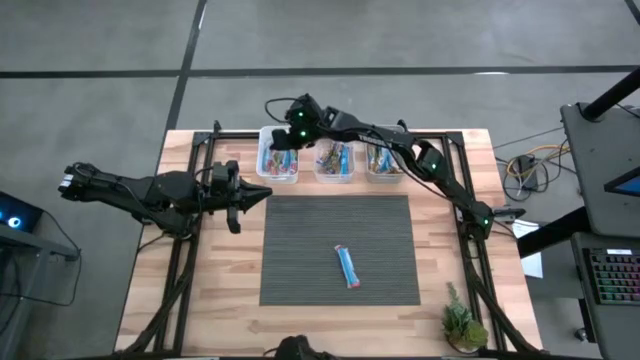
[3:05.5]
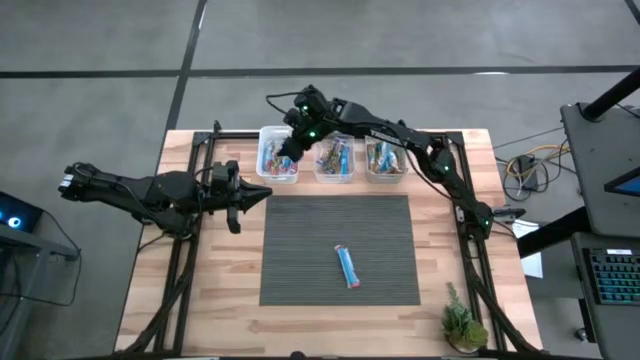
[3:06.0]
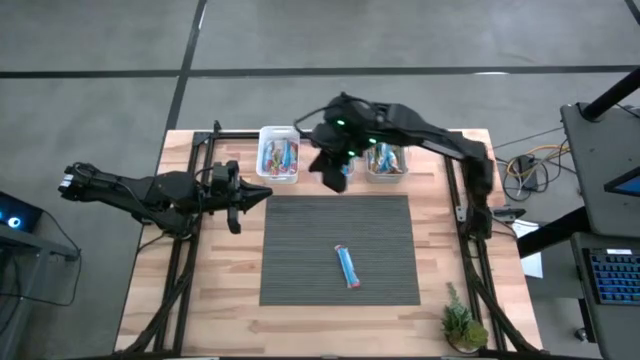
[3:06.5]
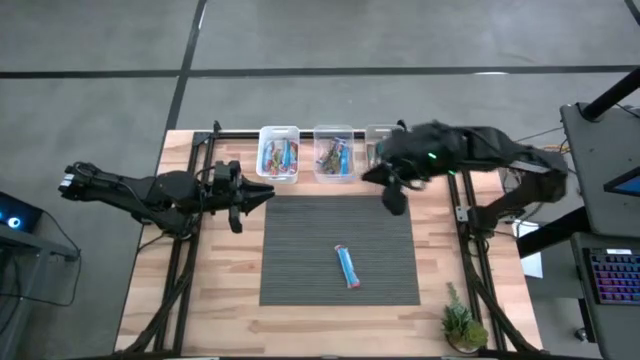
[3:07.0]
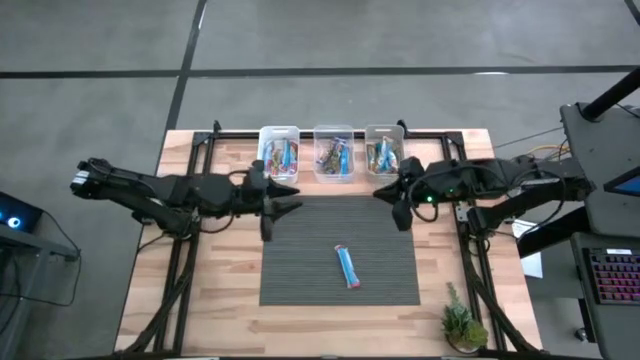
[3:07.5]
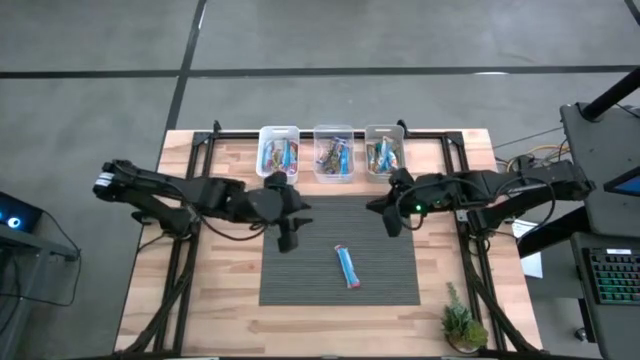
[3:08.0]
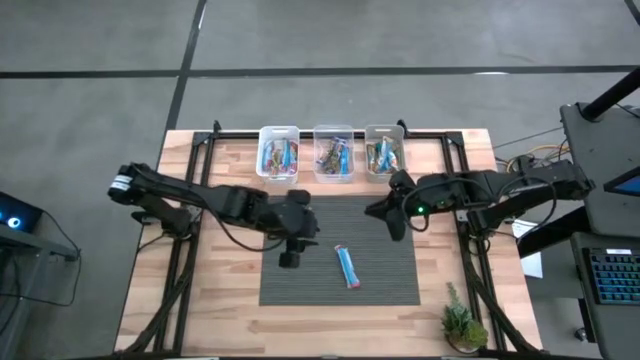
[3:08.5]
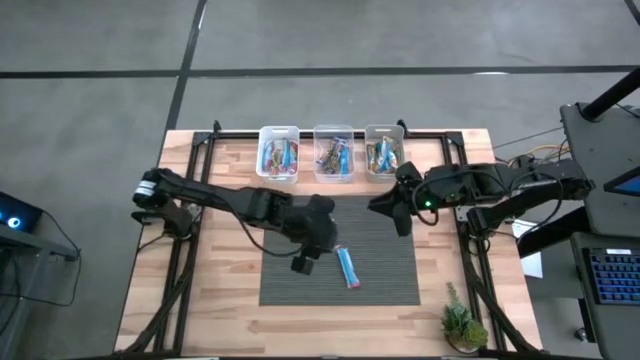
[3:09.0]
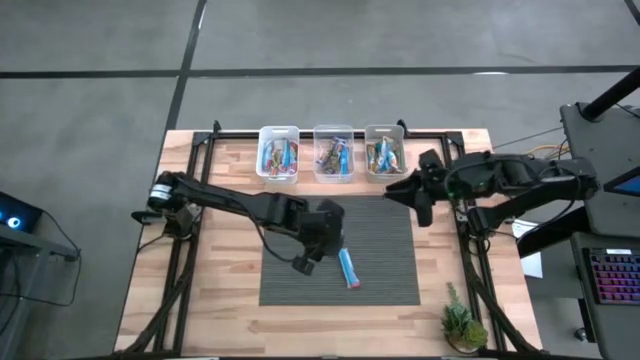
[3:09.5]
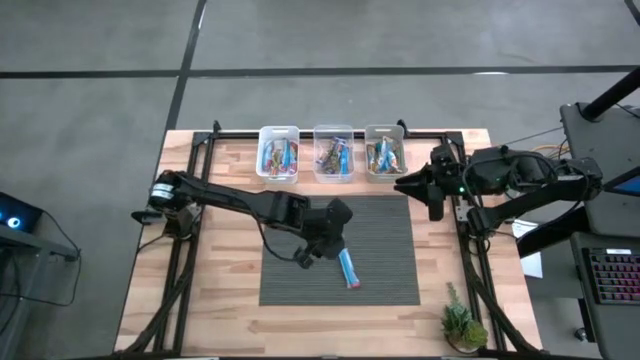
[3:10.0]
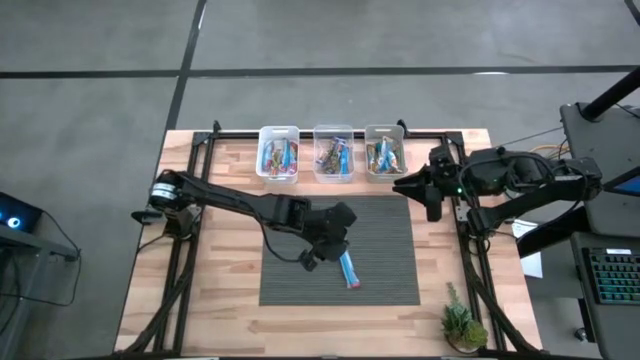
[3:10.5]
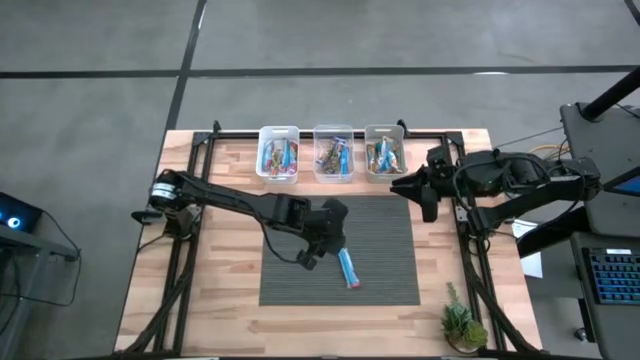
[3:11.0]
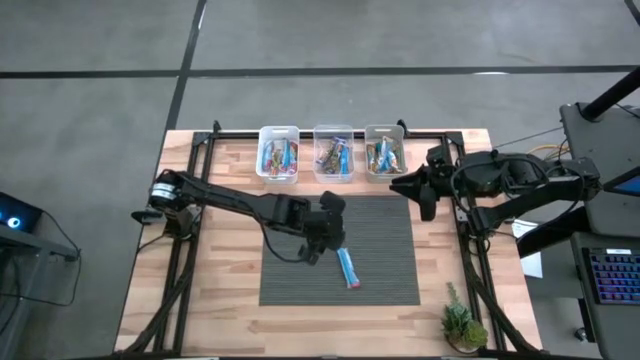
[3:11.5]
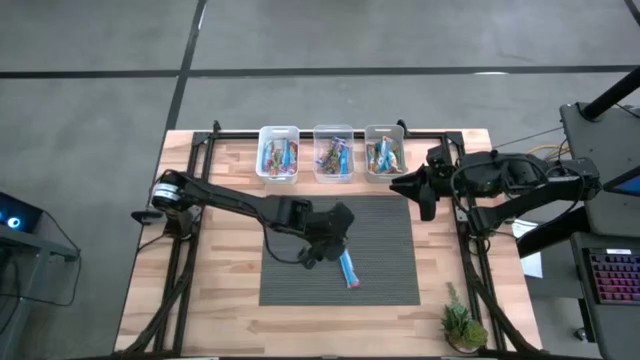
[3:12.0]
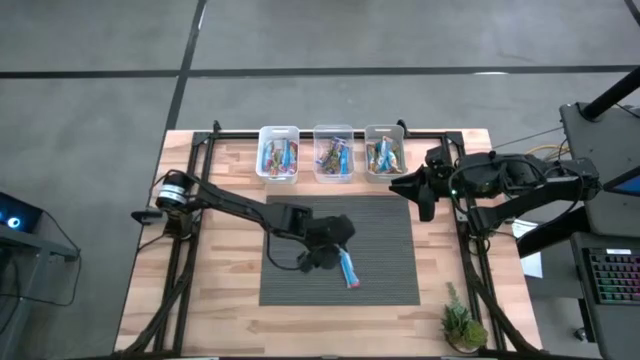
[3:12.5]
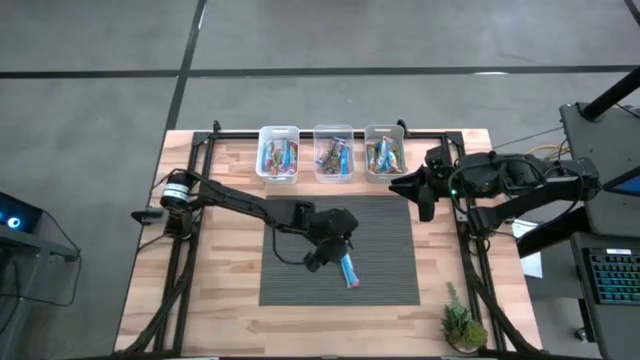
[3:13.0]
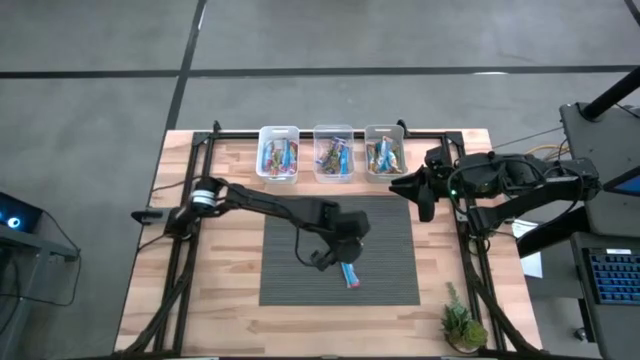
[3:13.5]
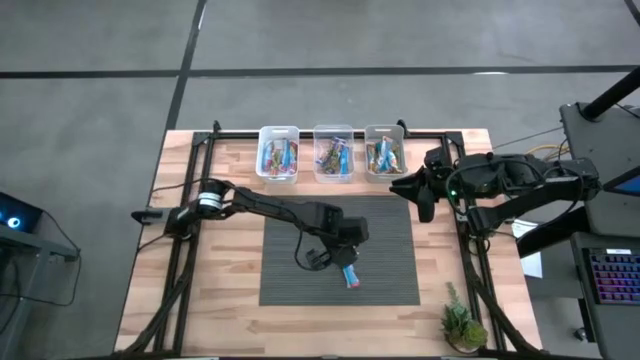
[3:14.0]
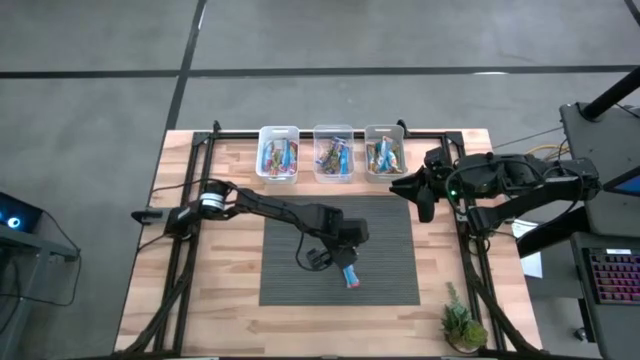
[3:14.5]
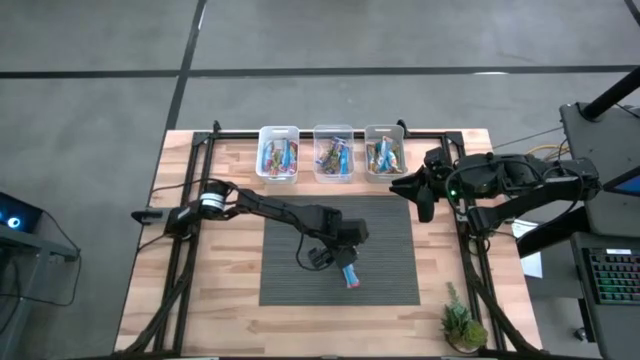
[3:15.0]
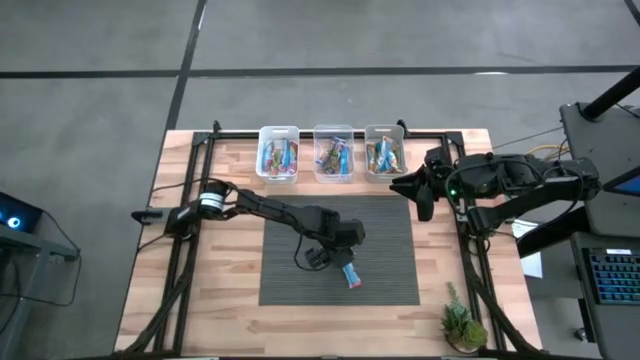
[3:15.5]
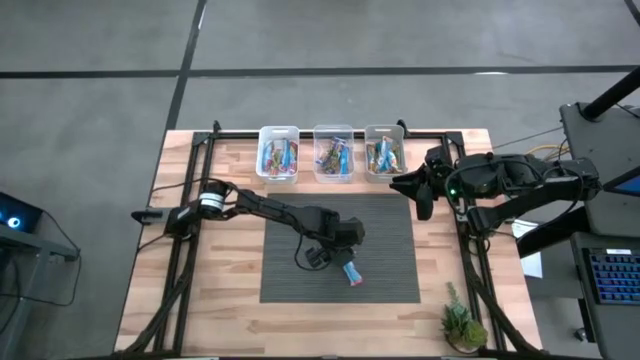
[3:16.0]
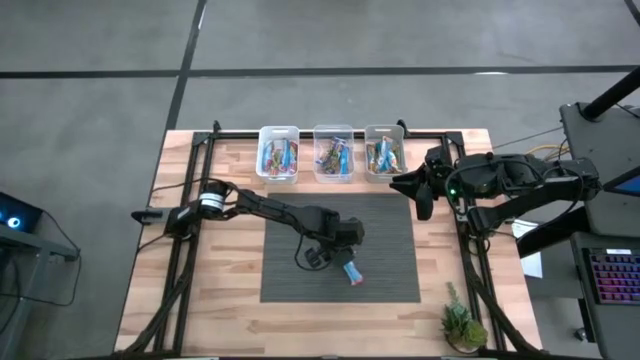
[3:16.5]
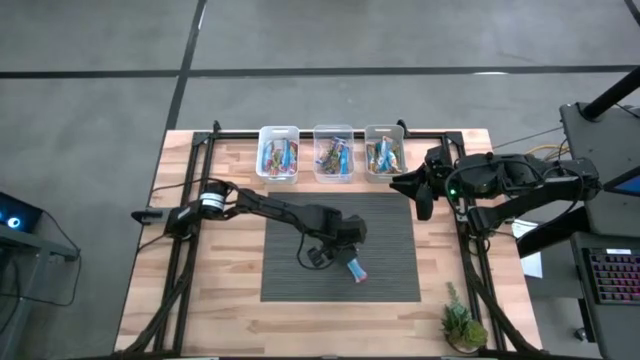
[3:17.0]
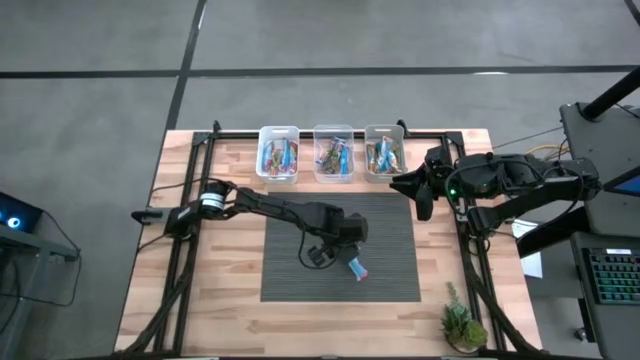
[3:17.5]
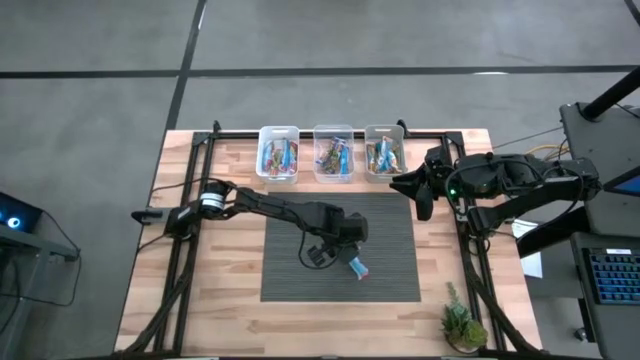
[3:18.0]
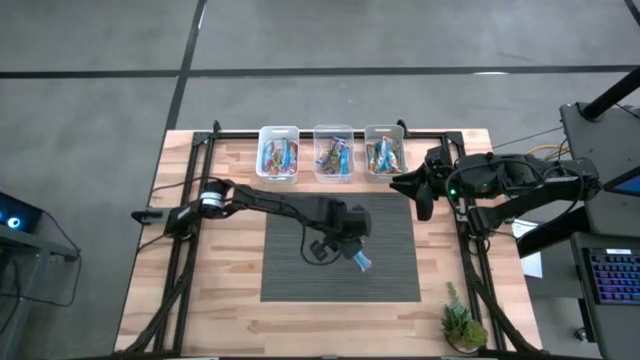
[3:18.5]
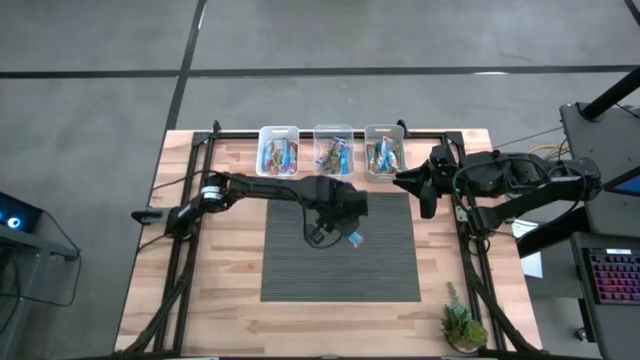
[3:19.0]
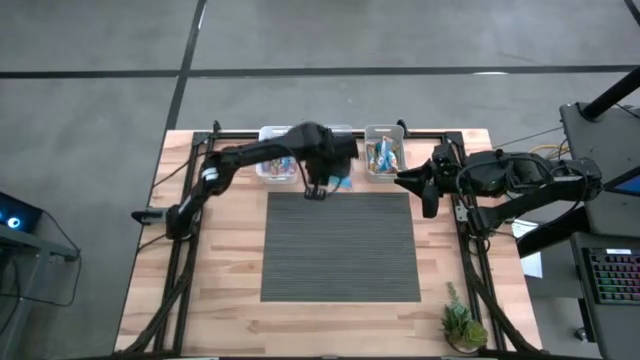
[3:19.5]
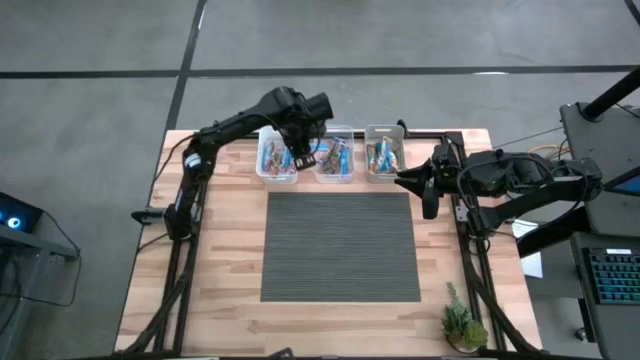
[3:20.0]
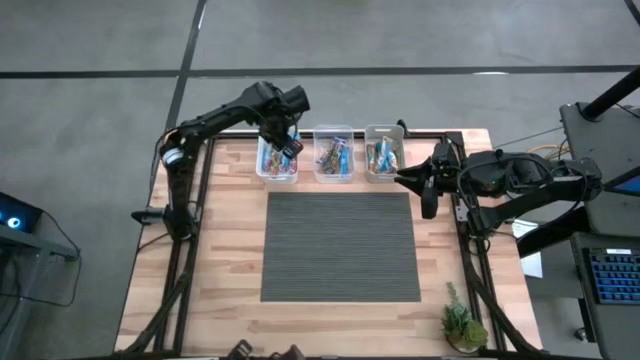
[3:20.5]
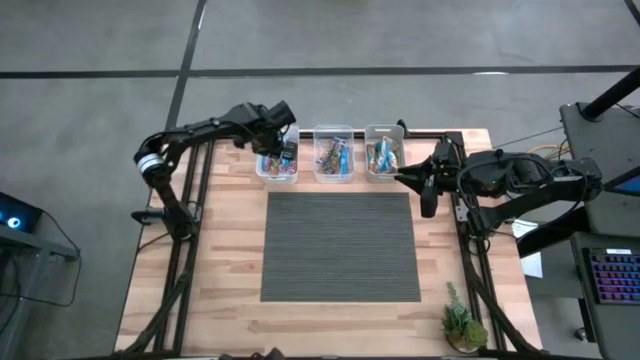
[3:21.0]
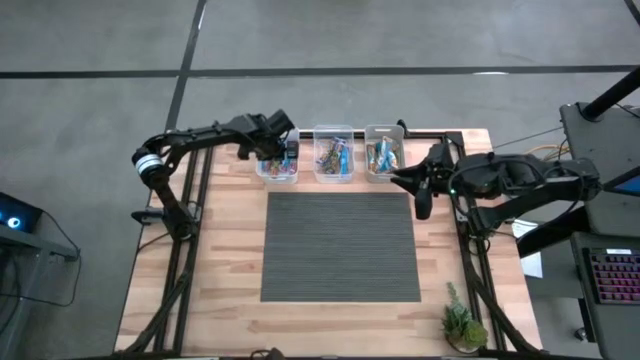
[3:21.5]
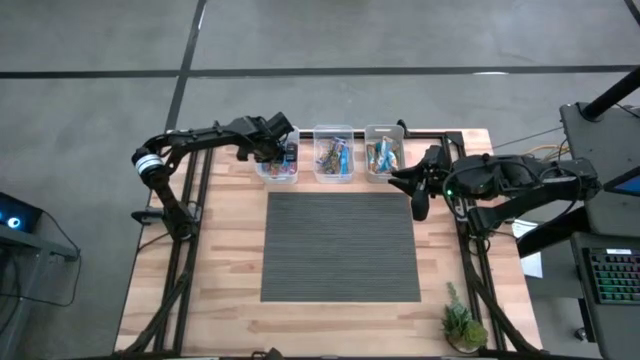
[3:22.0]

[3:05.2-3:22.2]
Task: Pick and place Granola Bars by type
Put the red granola bar into the white bin

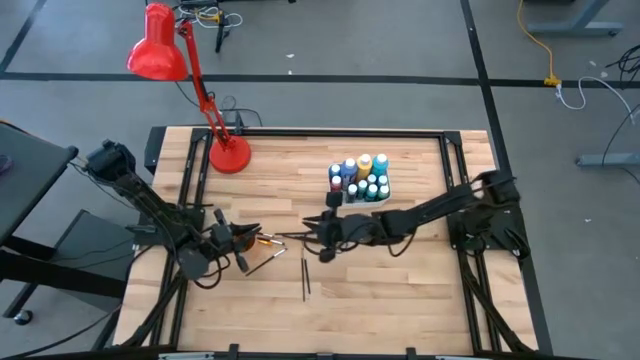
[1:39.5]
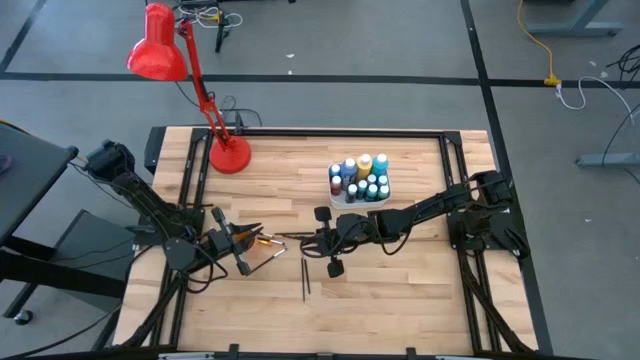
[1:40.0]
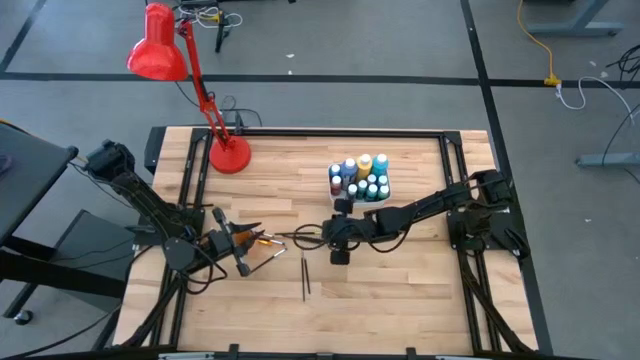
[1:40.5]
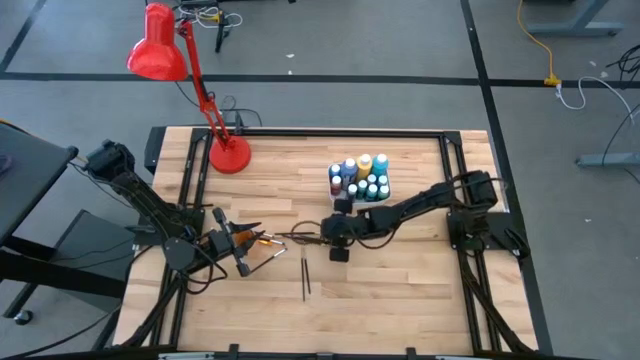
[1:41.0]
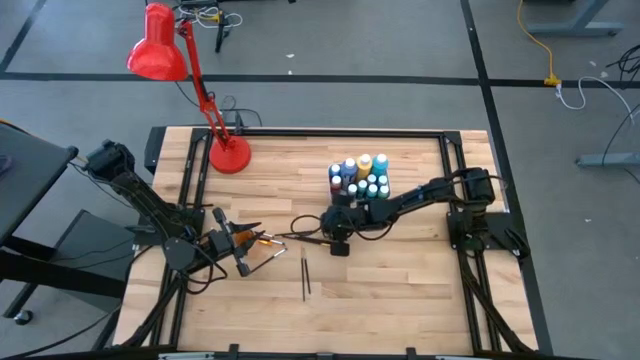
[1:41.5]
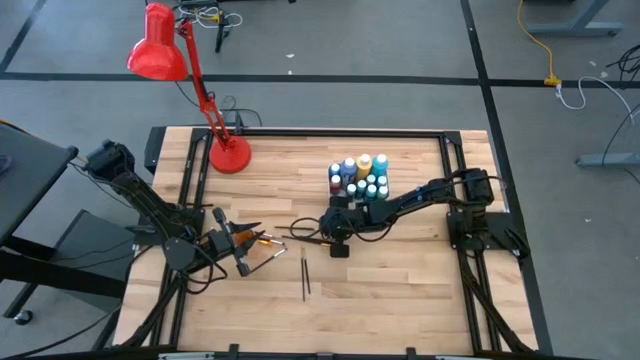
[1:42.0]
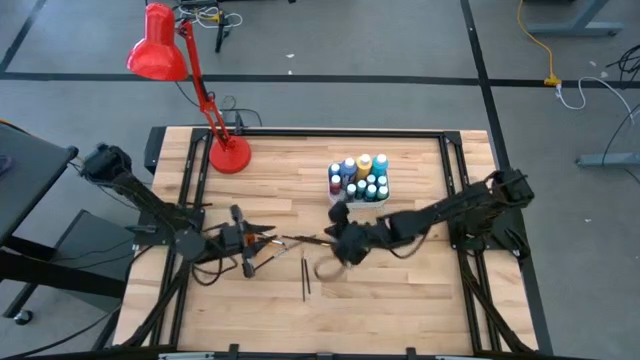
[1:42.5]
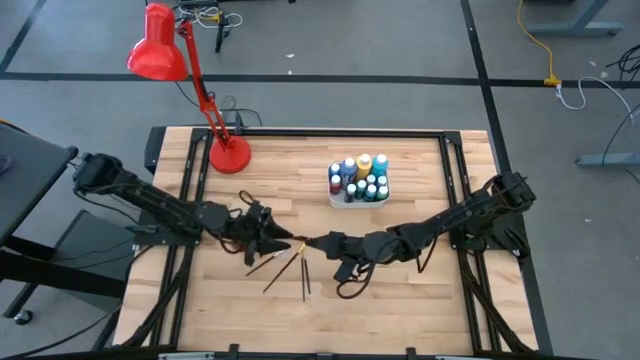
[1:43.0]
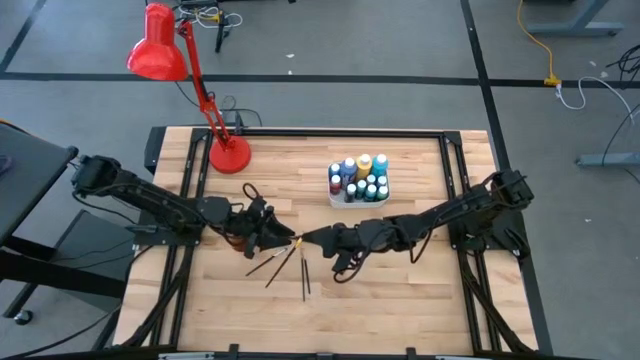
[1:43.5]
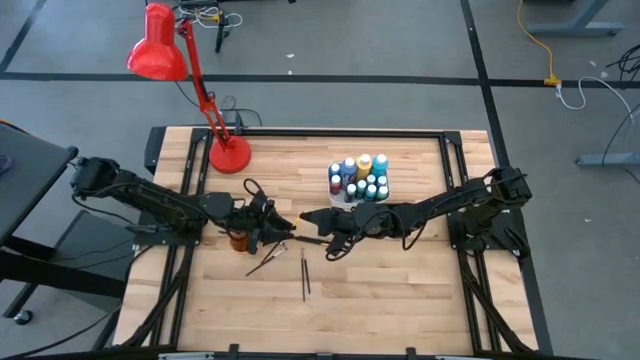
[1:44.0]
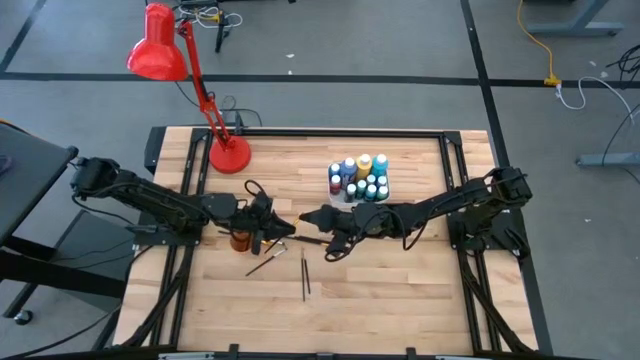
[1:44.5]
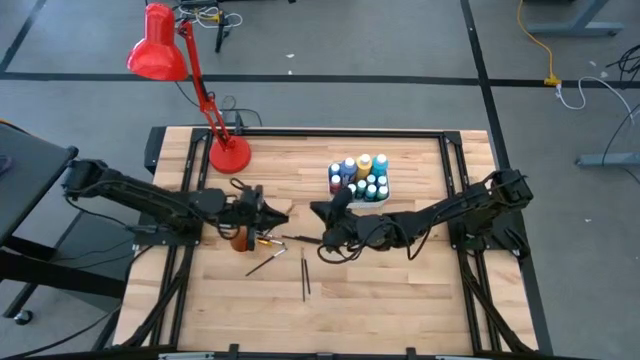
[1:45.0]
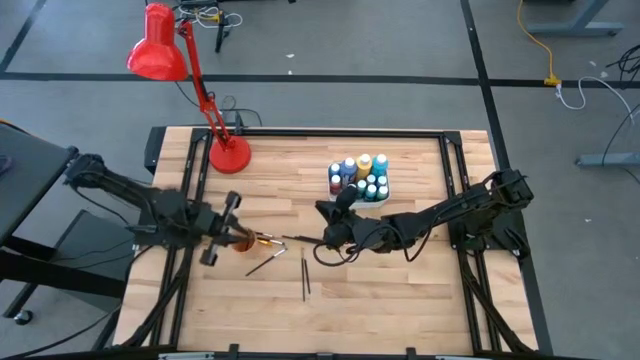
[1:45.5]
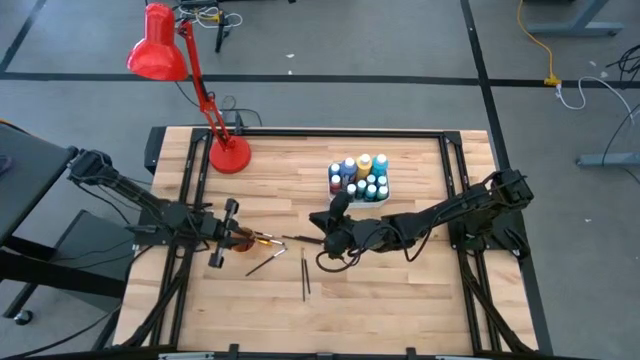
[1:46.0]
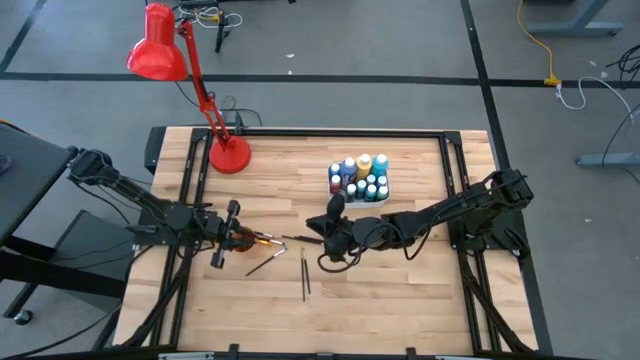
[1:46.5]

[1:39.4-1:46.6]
Task: Pick & Place Paint Supplies
Put the gold paint brush into the orange cup
